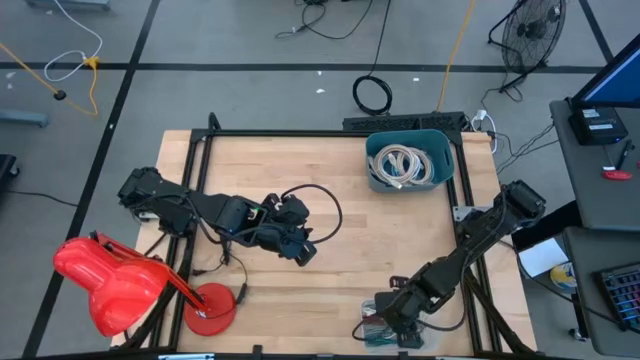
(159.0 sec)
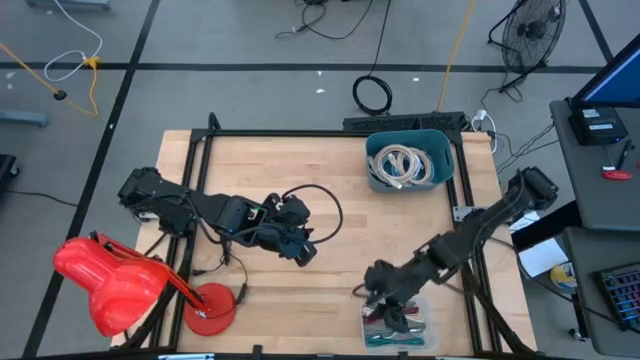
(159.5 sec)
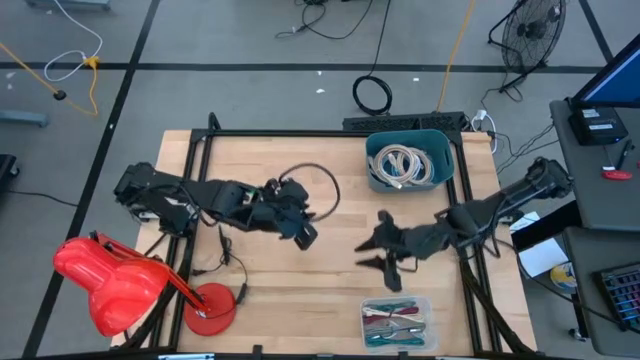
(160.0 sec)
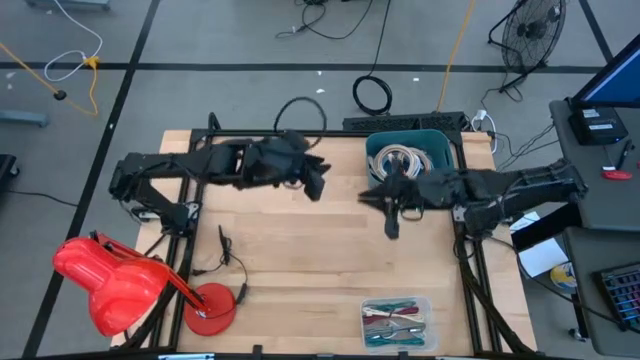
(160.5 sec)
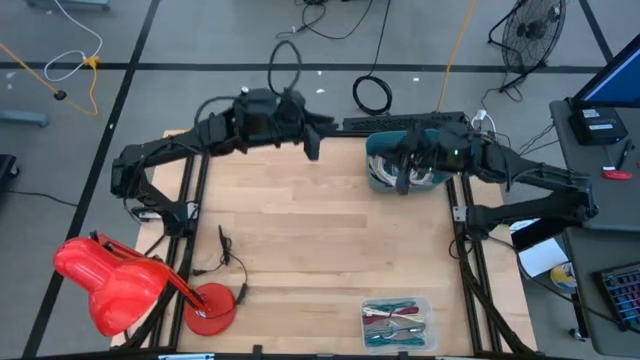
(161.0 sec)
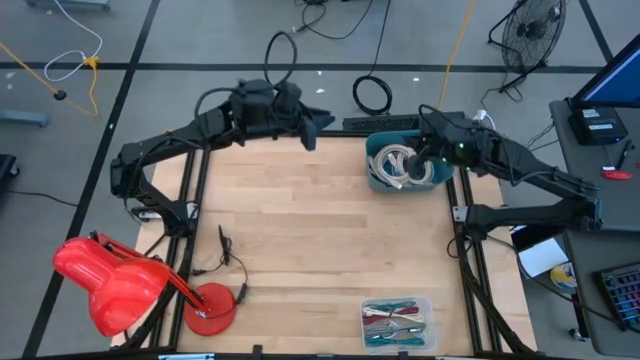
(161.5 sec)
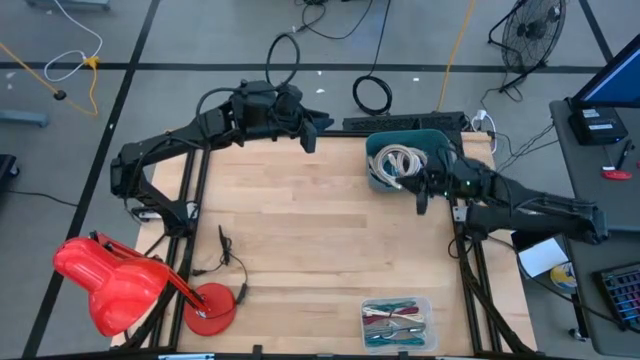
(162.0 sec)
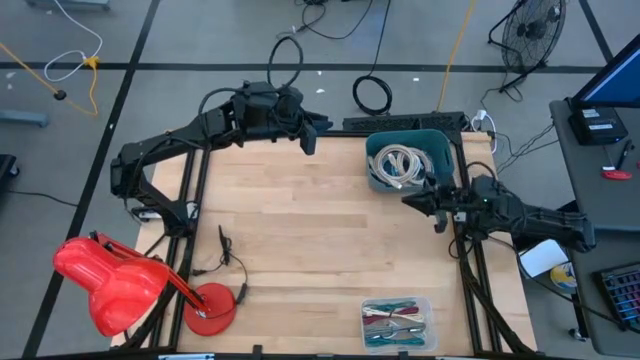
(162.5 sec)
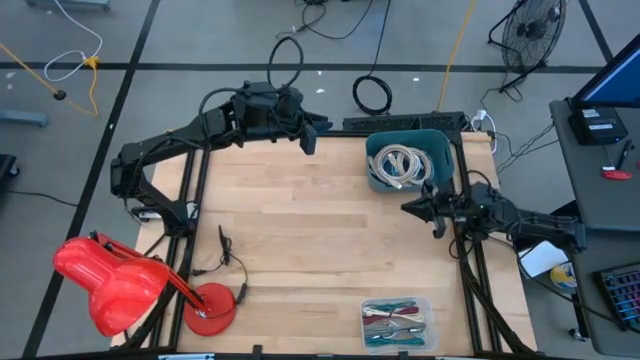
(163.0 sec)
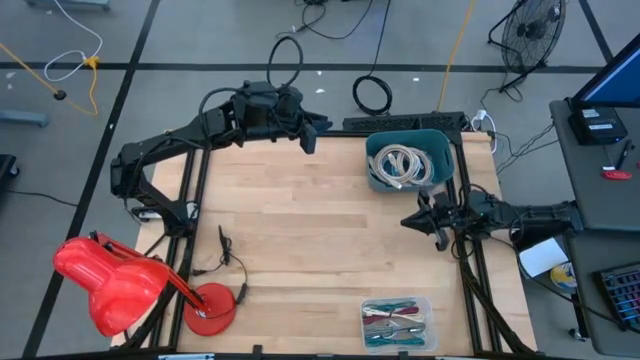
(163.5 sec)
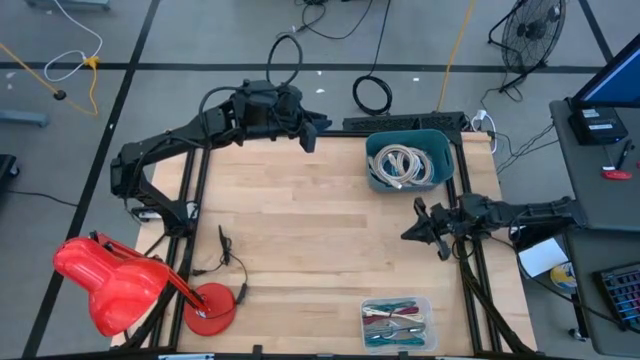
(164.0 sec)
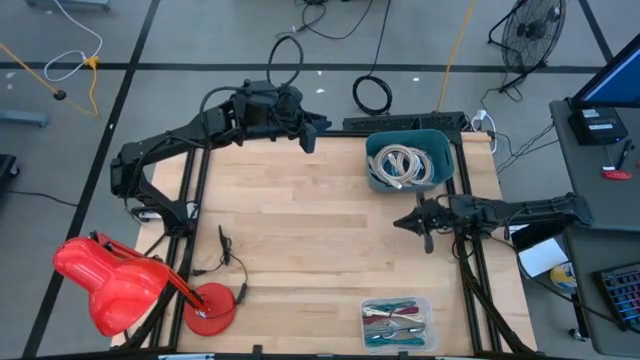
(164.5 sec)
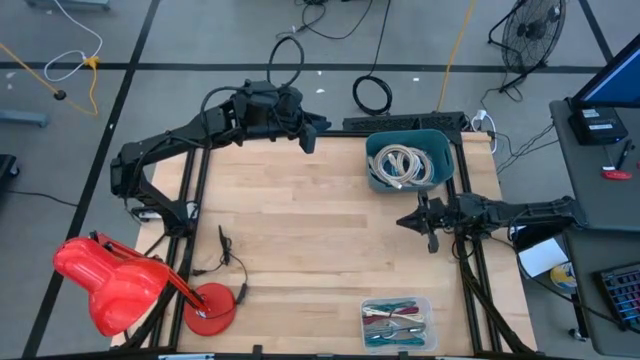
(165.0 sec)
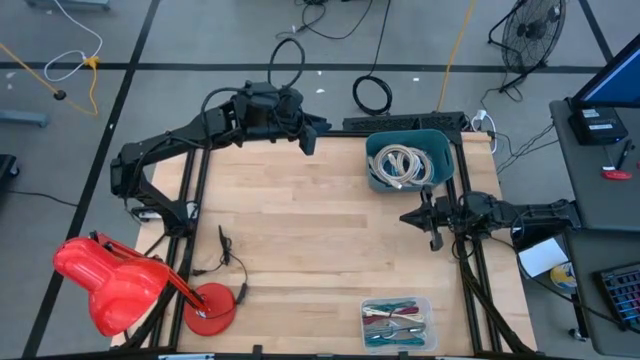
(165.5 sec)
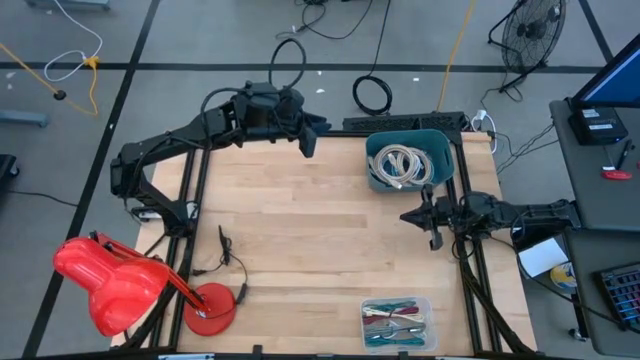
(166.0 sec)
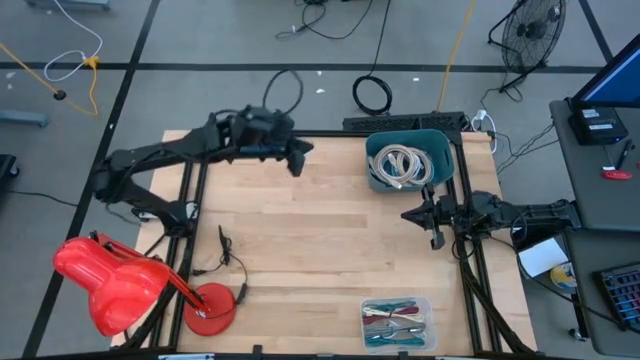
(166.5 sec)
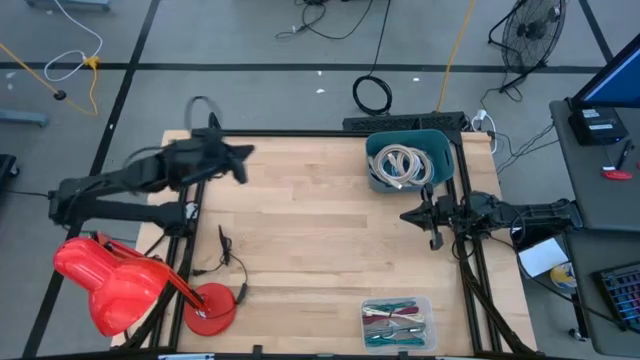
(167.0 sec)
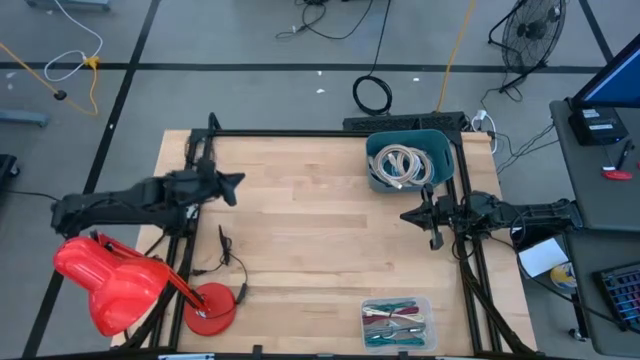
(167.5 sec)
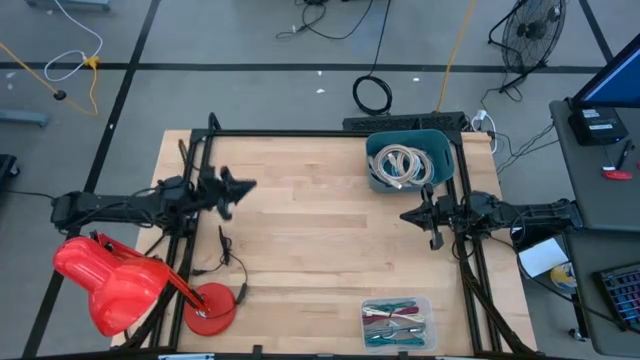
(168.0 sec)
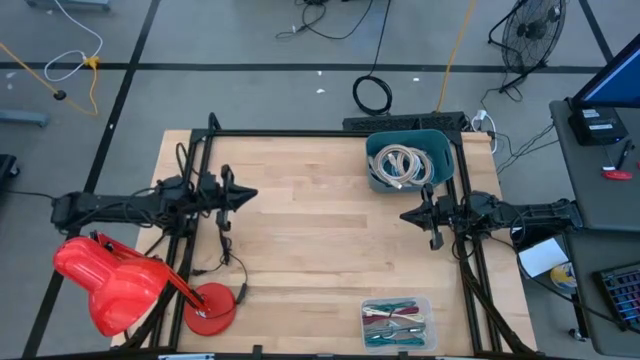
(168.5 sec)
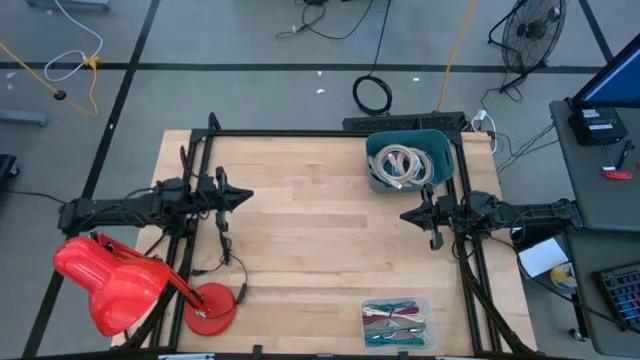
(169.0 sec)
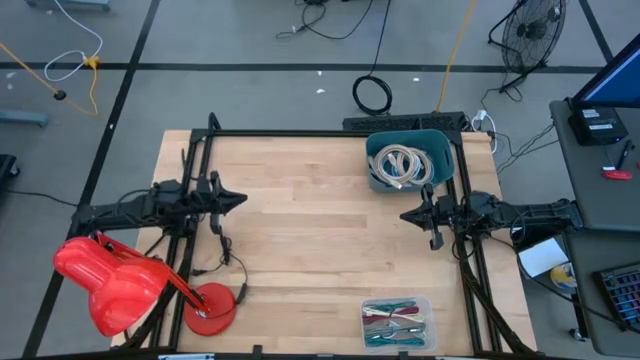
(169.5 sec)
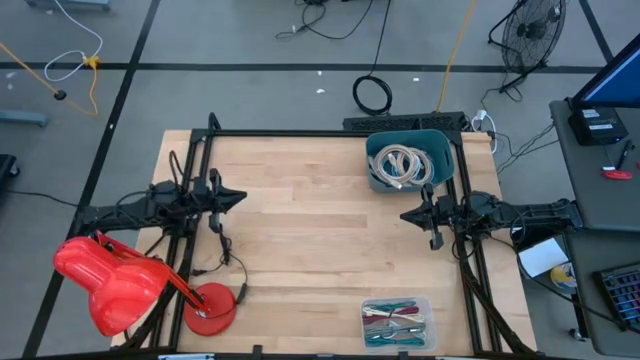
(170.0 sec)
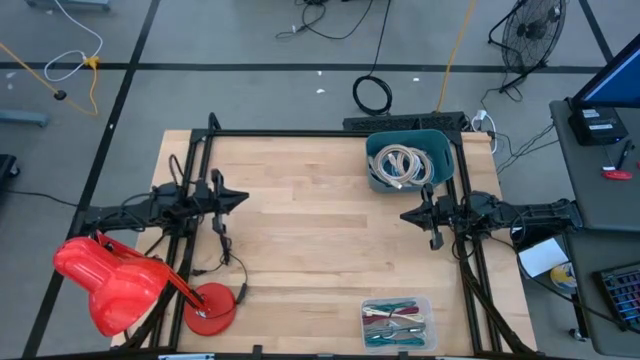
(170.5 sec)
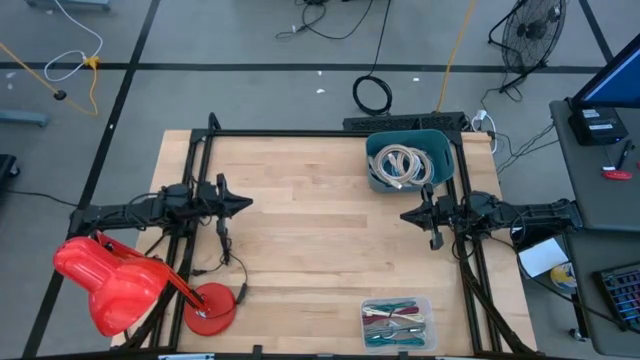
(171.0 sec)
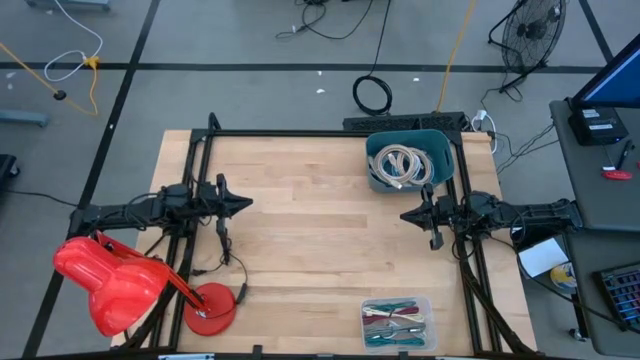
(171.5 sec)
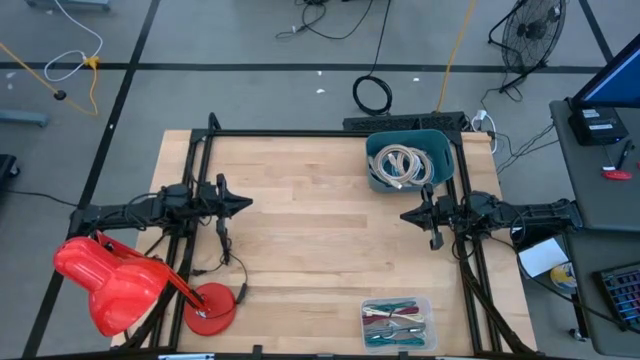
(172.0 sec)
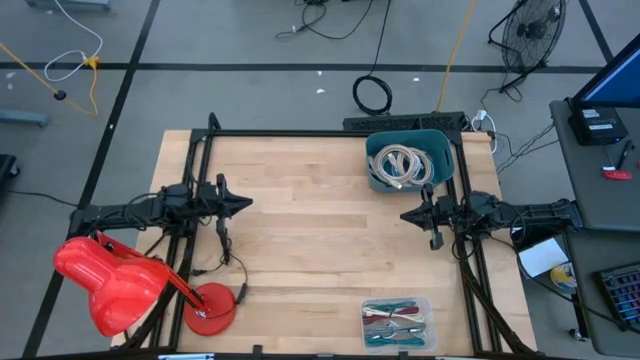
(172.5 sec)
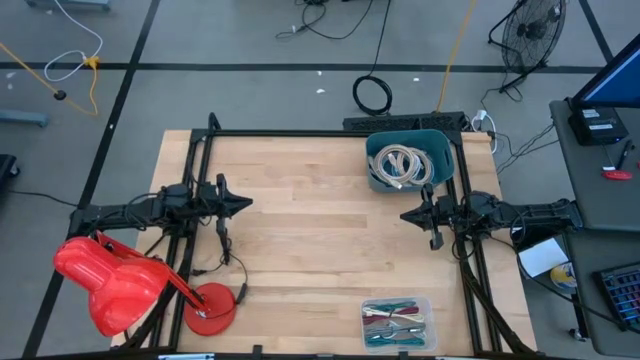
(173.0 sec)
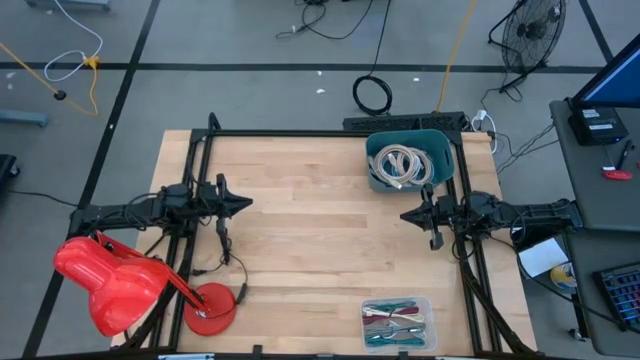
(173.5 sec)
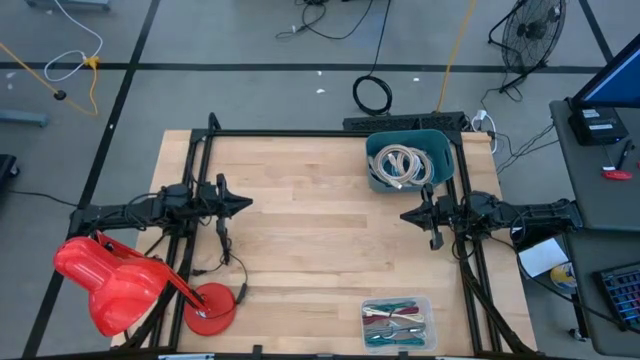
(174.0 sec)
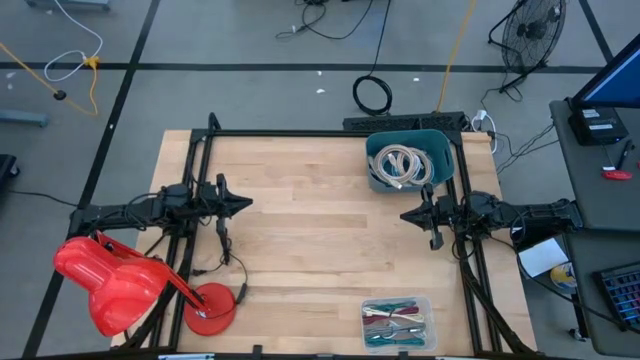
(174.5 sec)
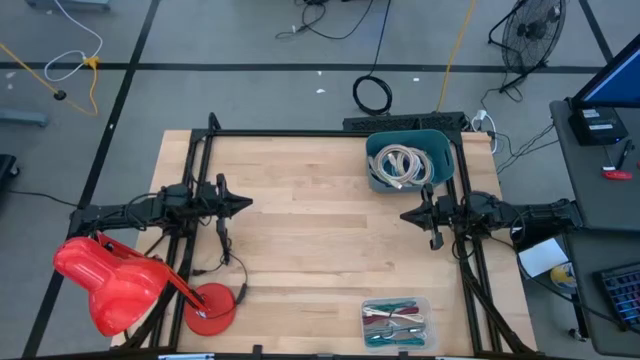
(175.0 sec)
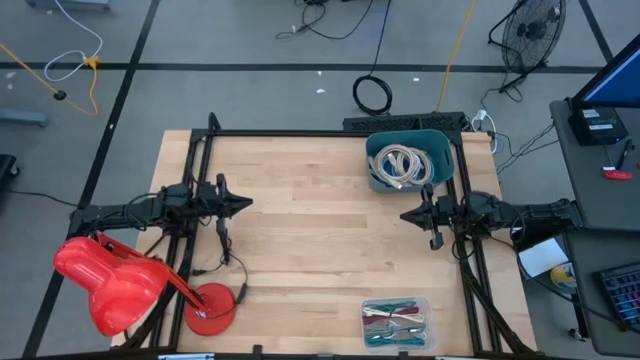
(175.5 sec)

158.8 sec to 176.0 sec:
Task: Pick & Place USB Port
Return to Home Position

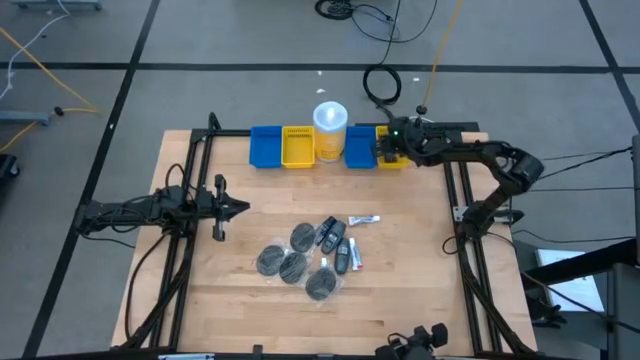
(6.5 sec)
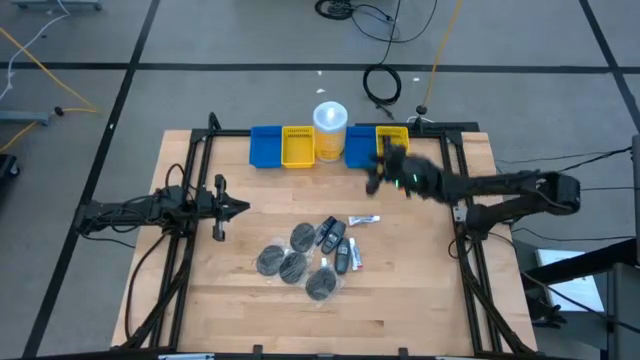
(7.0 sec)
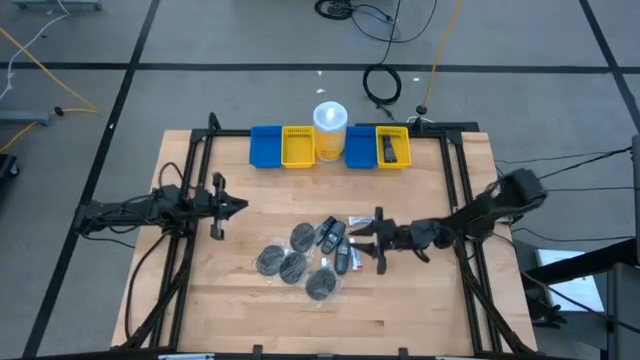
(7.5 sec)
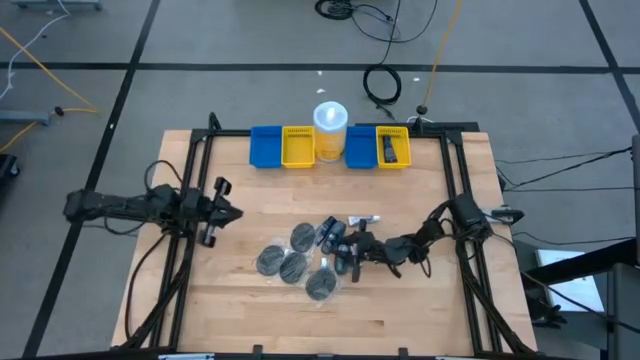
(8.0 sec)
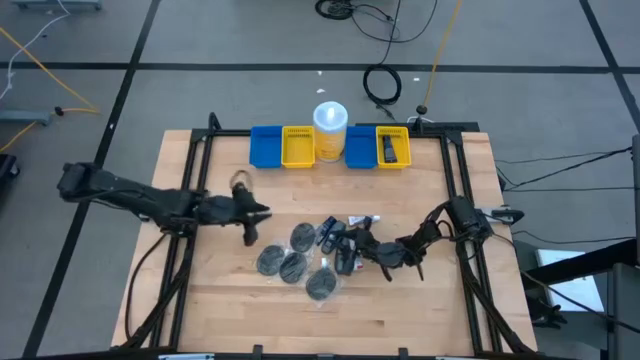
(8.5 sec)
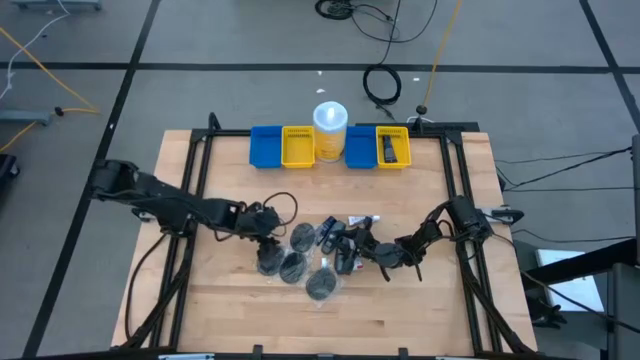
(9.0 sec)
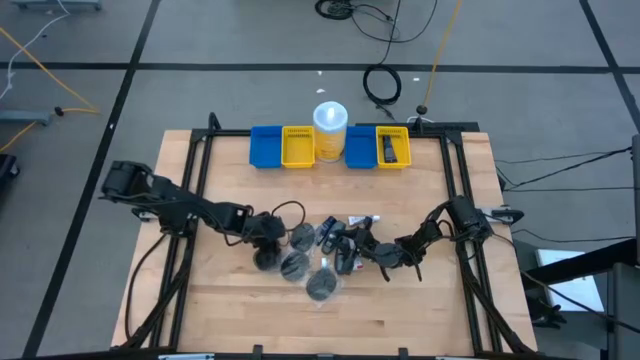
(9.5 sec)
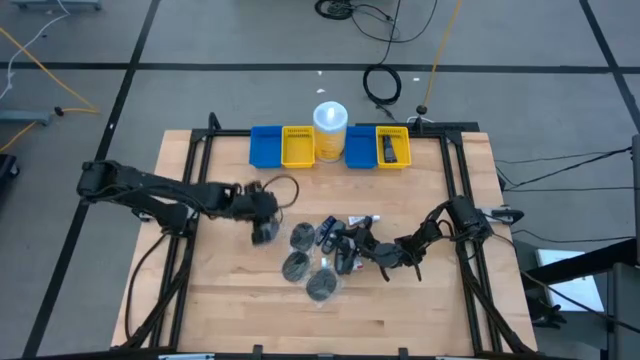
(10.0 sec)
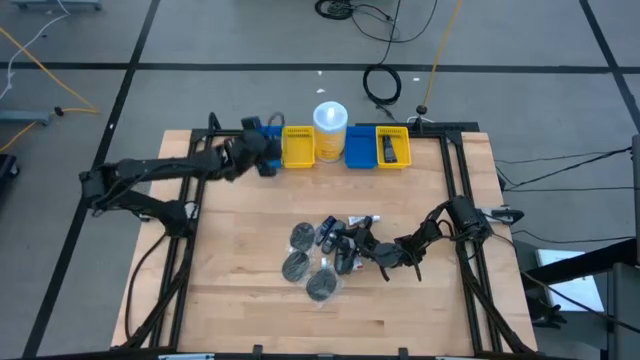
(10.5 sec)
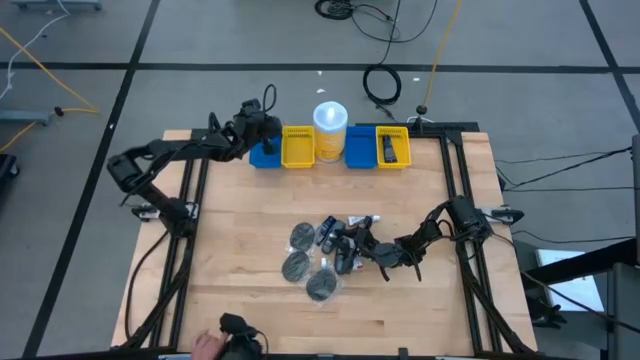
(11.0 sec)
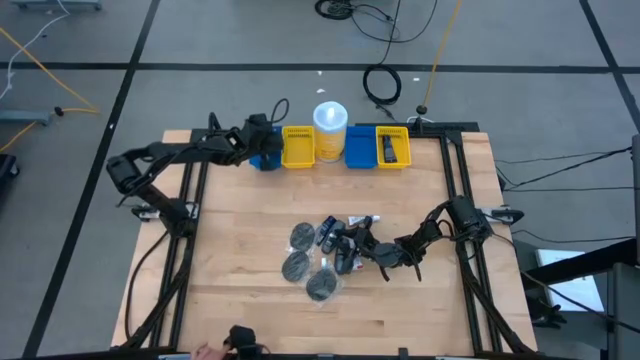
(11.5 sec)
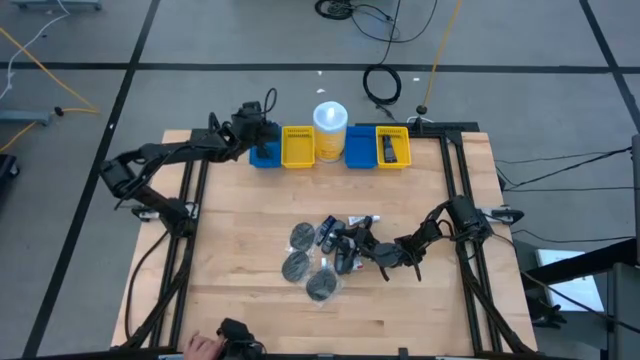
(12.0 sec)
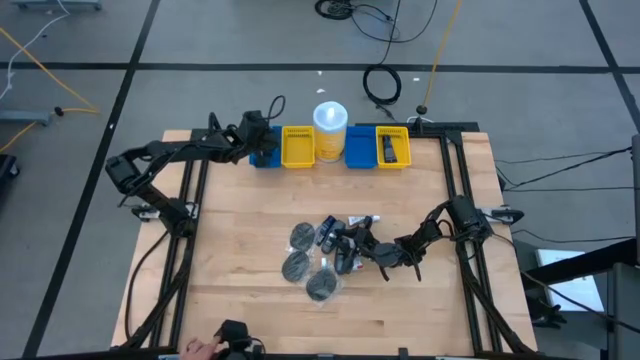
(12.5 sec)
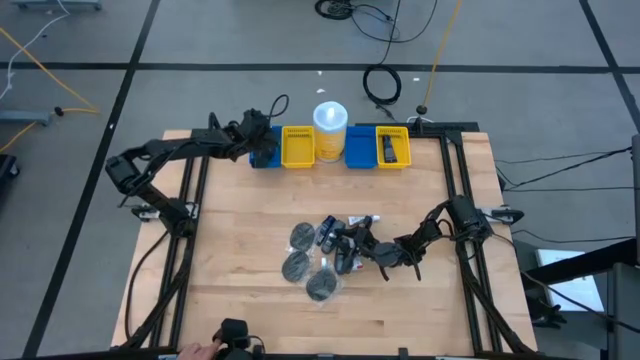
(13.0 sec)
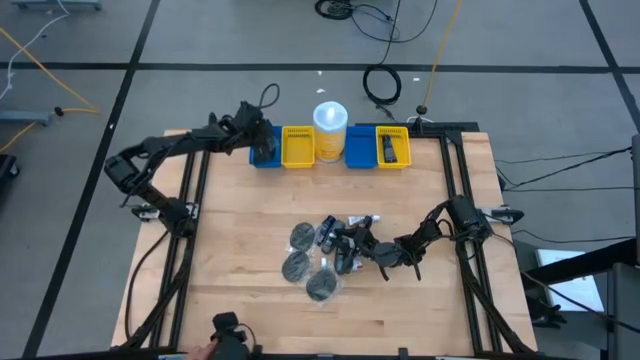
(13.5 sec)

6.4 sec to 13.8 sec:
Task: Pick & Place Travel size toiletries
Put the black hairbrush into the left blue bin
